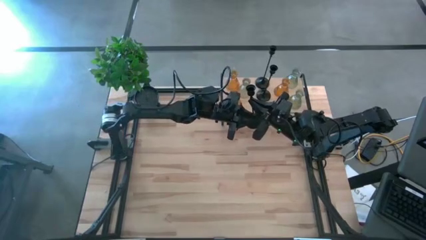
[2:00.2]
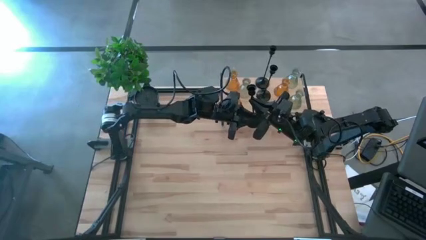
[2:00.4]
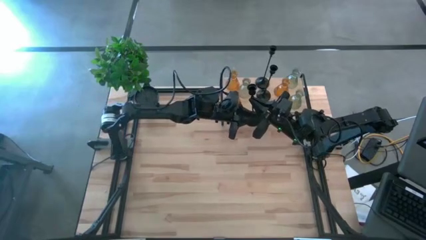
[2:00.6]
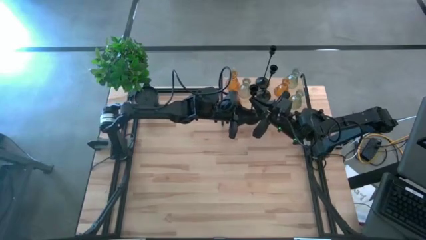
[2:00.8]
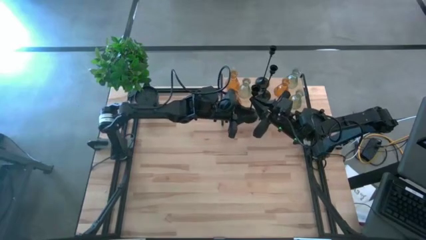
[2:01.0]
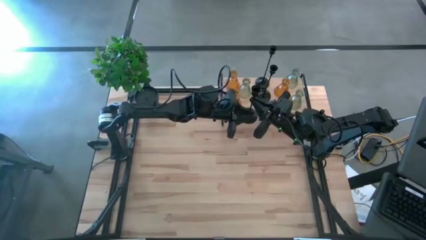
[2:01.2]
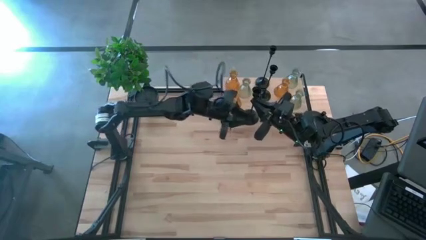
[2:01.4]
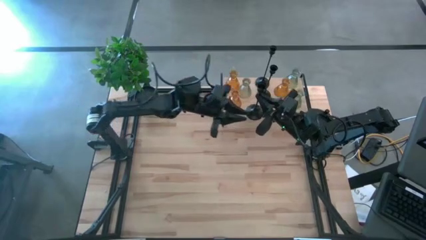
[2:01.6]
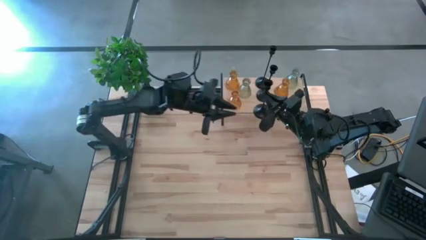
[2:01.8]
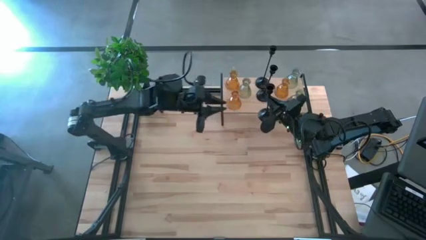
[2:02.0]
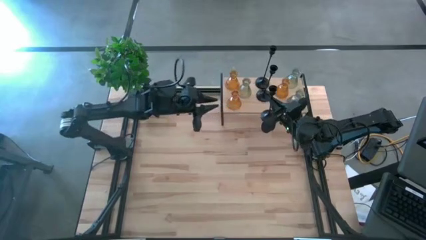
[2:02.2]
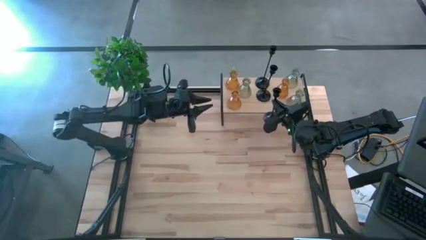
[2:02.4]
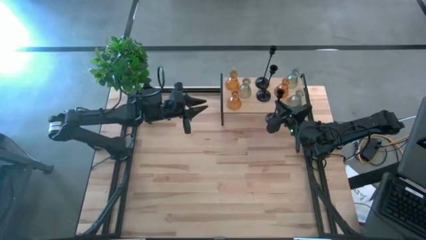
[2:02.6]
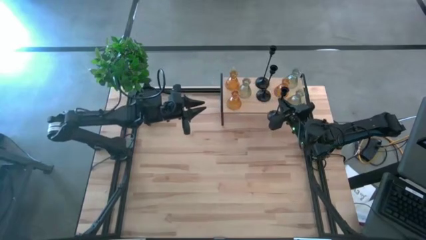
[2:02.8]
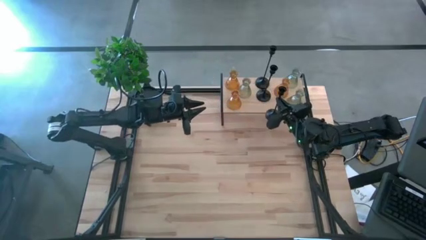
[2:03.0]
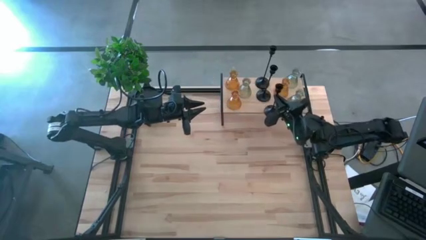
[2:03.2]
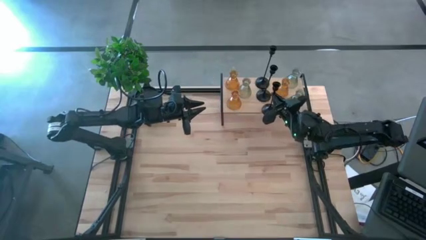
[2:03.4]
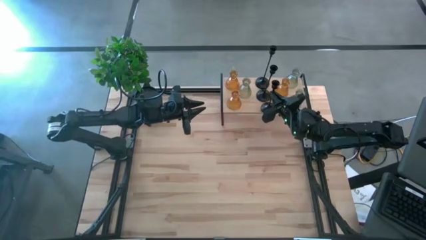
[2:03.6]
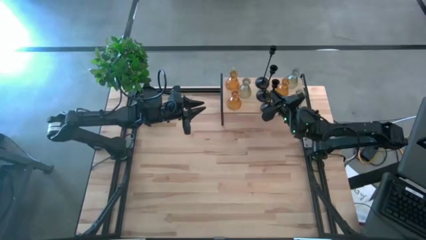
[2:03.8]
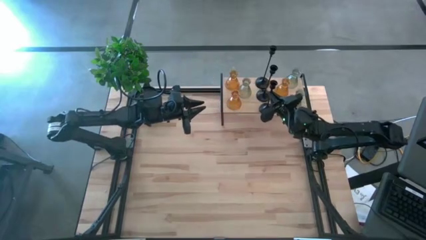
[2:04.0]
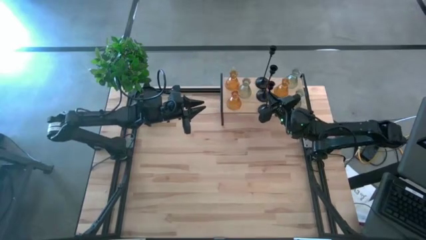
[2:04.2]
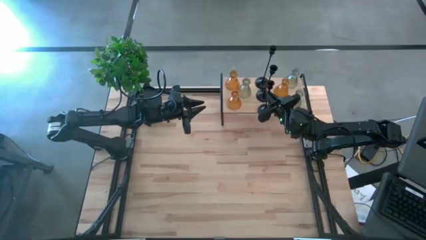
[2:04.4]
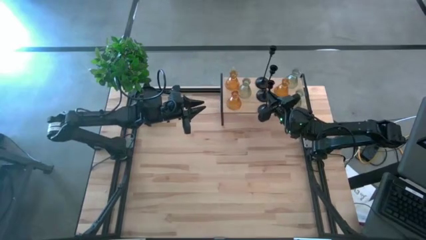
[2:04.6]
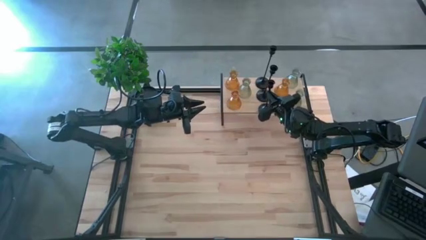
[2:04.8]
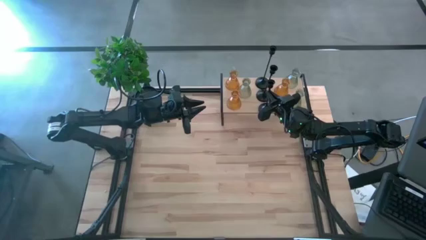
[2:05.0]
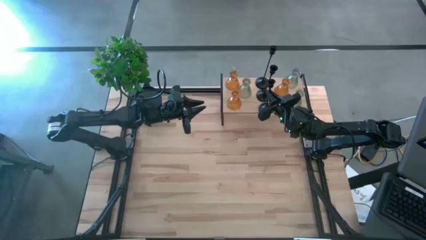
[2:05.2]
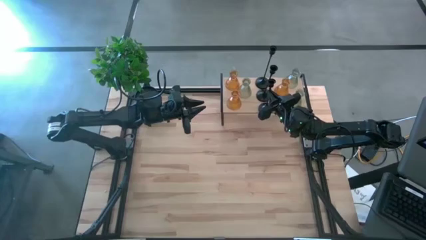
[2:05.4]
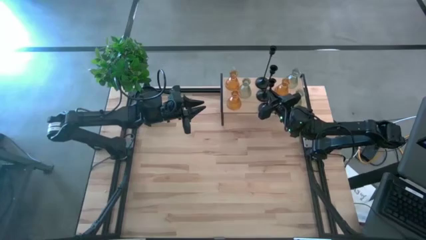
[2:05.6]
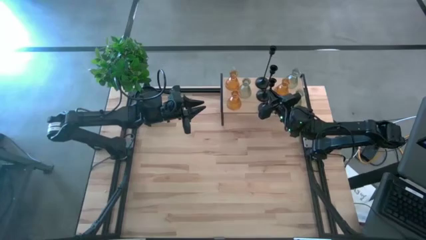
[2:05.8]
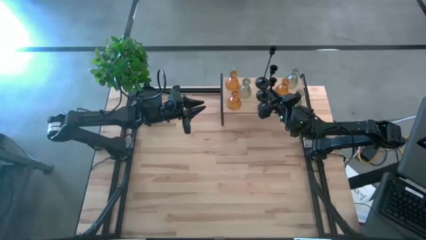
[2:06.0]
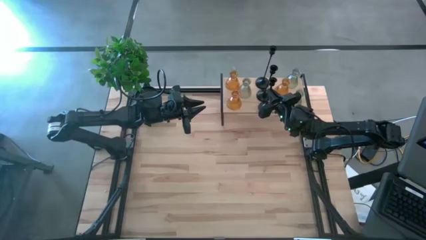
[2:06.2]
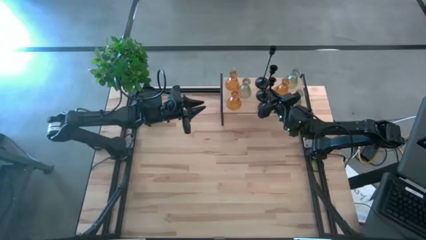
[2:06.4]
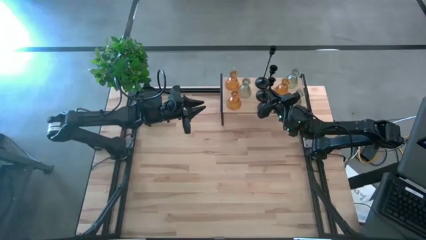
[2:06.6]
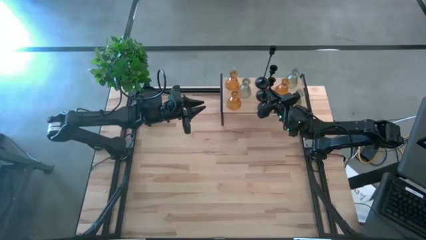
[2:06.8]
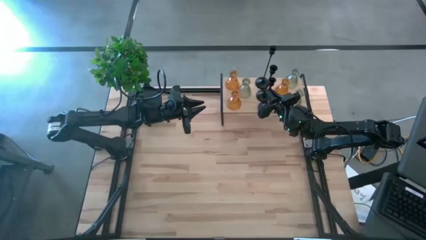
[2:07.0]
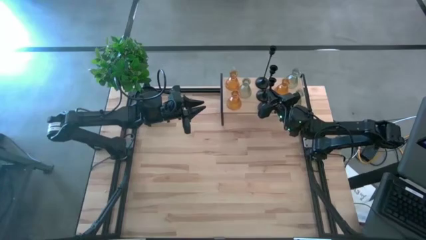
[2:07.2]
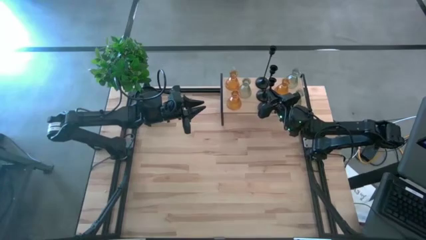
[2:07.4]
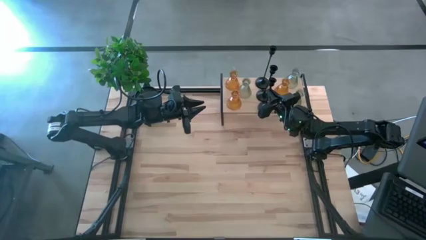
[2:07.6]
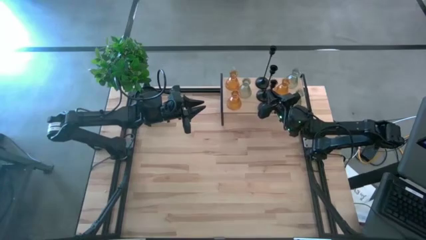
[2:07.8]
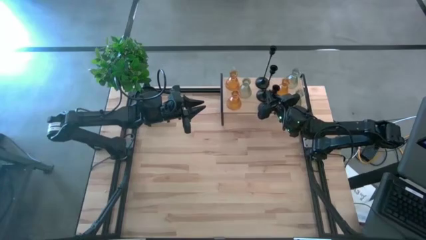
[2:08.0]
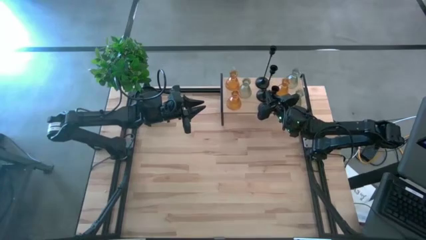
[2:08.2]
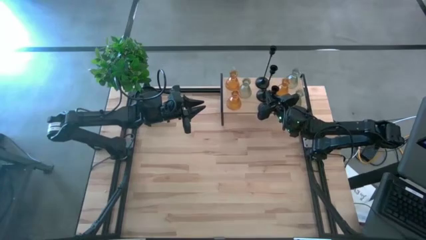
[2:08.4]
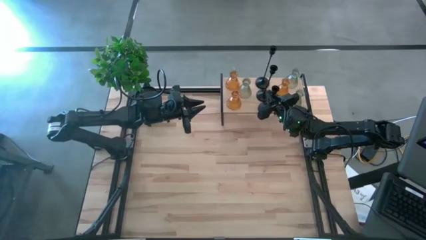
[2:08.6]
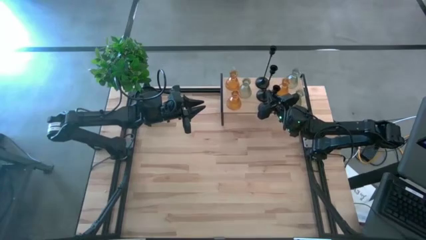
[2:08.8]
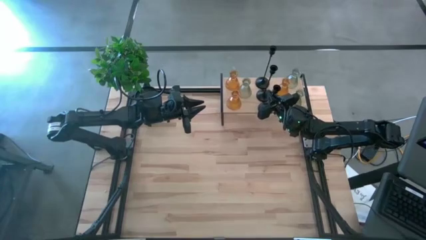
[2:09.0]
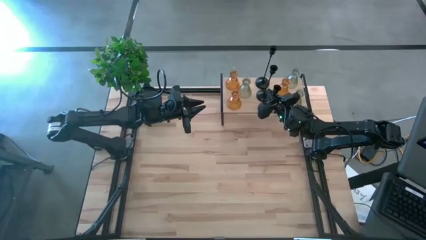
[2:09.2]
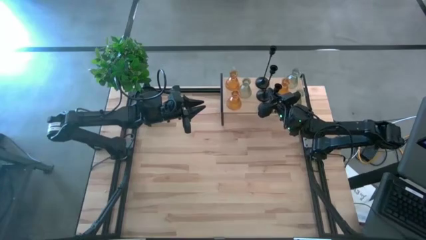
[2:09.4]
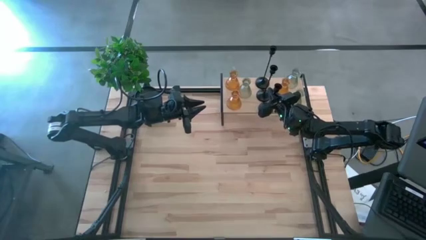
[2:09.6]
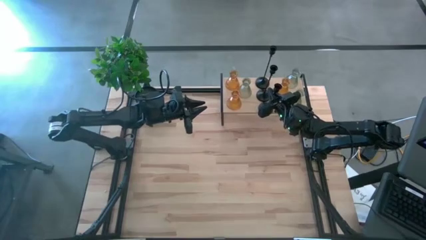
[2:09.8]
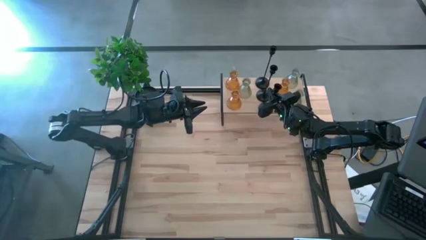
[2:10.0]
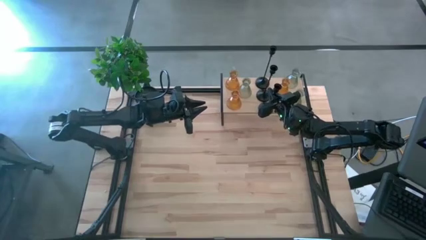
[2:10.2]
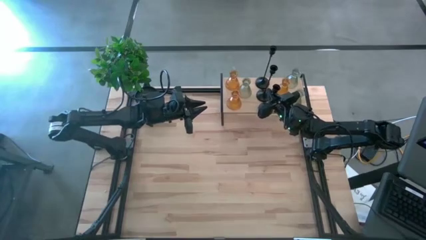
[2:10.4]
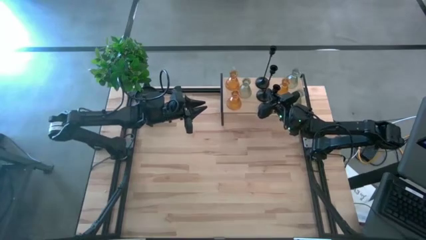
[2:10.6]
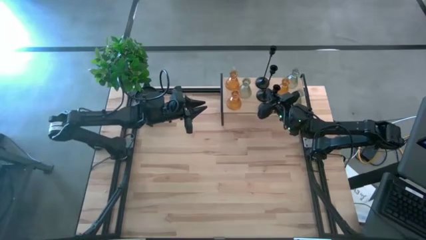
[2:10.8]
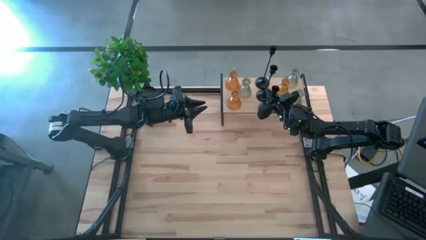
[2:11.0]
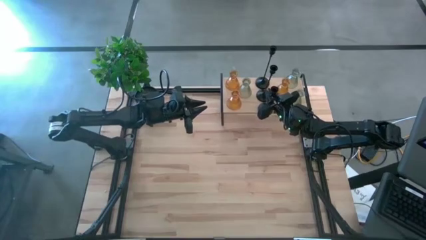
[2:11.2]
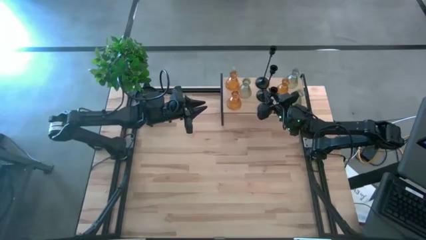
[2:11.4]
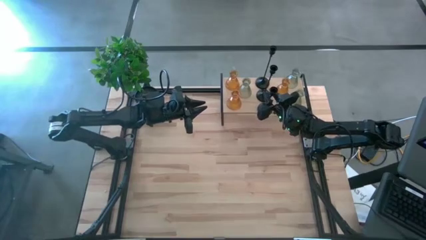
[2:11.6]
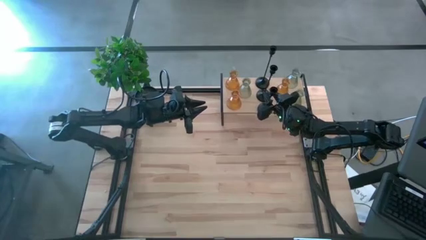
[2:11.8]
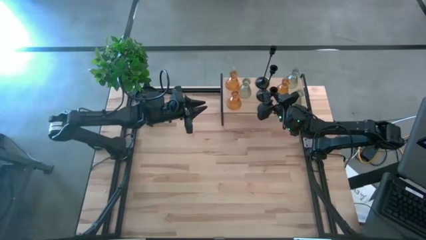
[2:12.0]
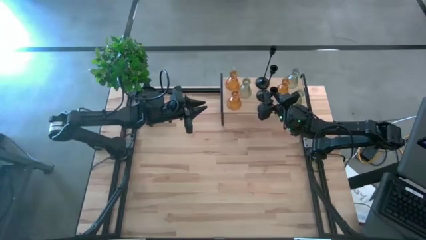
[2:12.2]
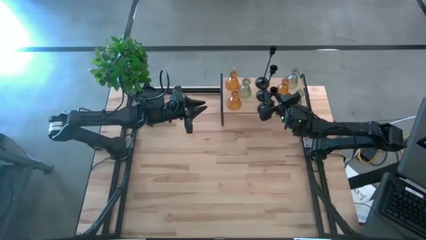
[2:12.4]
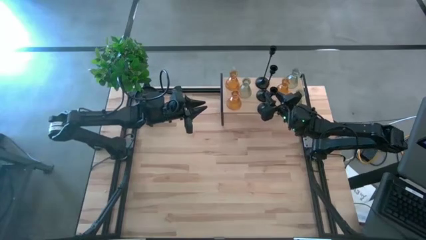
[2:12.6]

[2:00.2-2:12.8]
Task: Pick & Place candle stick holders
Put the black candle holder on the shelf

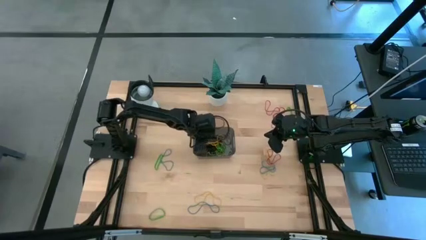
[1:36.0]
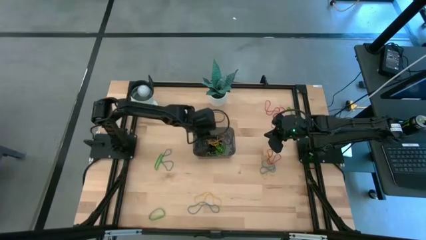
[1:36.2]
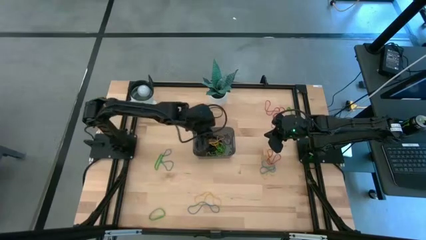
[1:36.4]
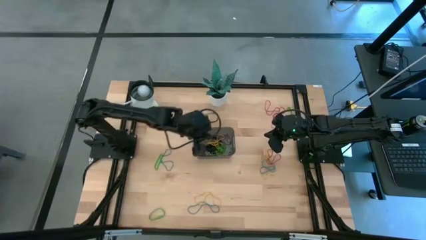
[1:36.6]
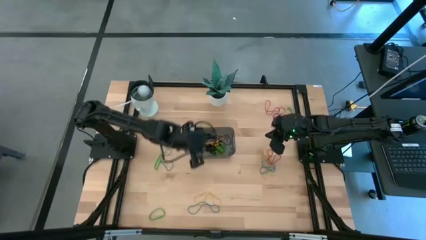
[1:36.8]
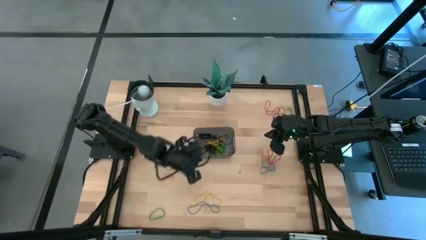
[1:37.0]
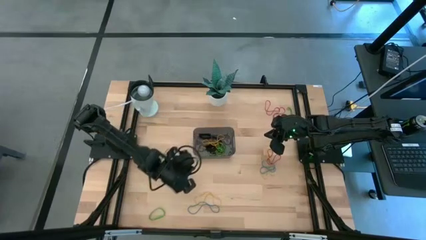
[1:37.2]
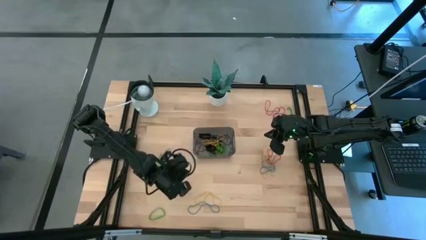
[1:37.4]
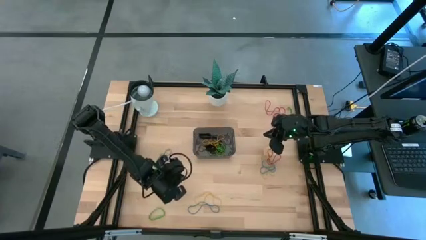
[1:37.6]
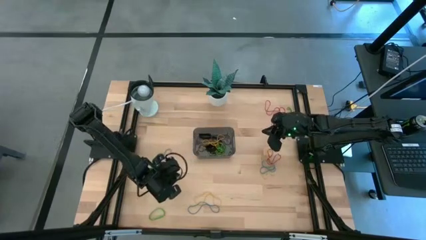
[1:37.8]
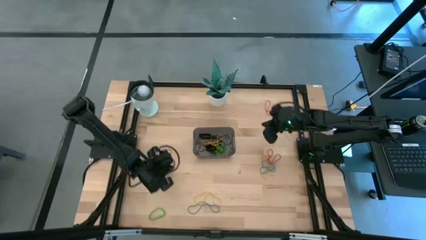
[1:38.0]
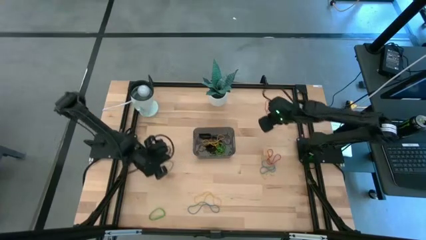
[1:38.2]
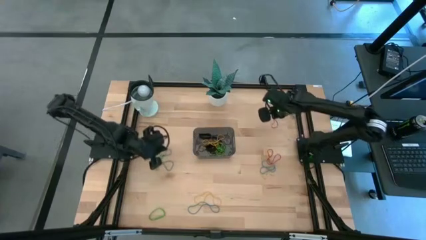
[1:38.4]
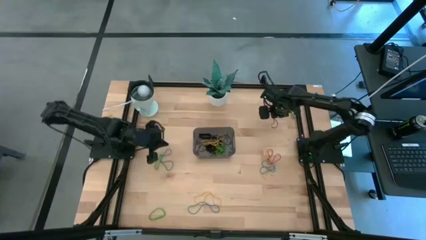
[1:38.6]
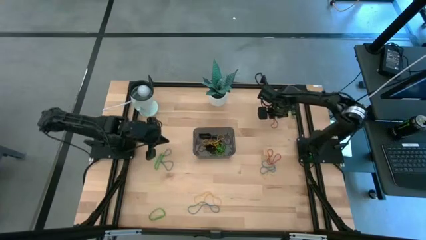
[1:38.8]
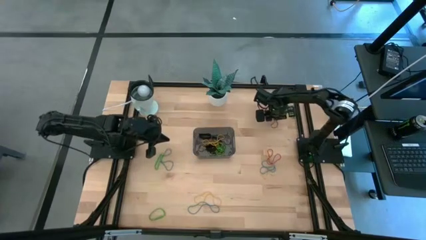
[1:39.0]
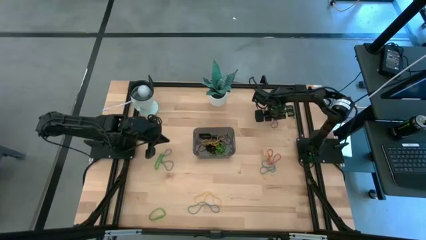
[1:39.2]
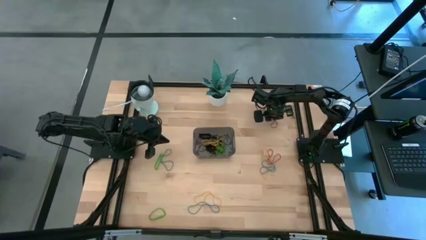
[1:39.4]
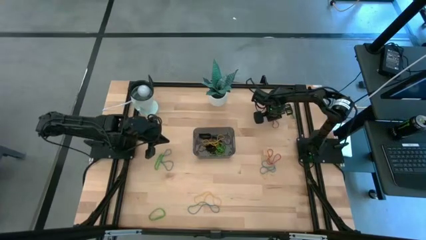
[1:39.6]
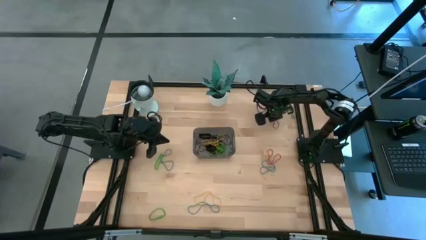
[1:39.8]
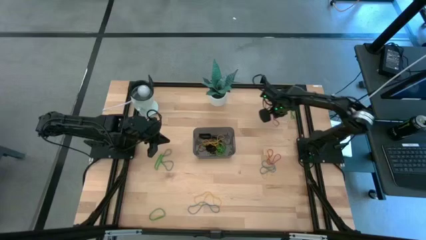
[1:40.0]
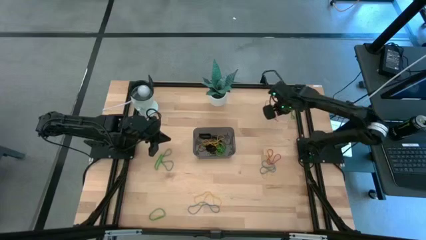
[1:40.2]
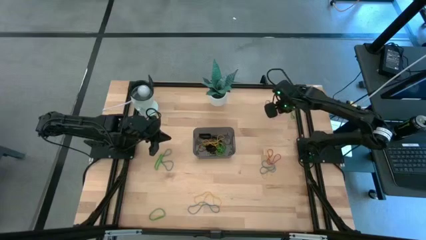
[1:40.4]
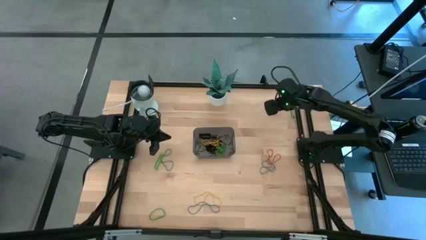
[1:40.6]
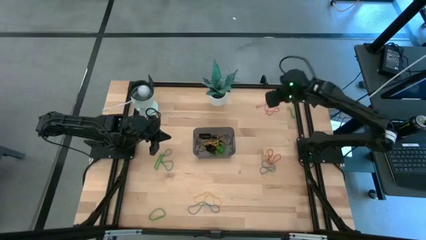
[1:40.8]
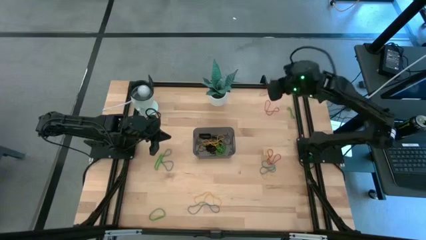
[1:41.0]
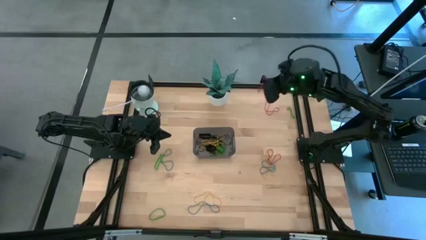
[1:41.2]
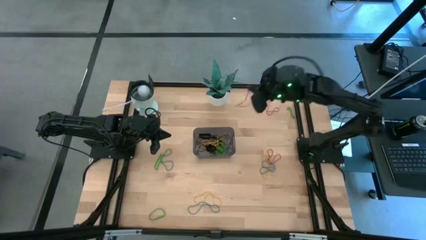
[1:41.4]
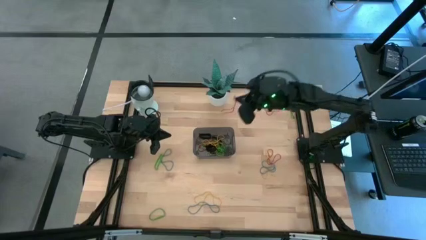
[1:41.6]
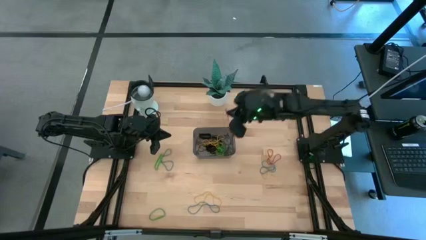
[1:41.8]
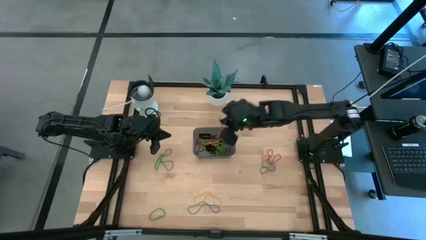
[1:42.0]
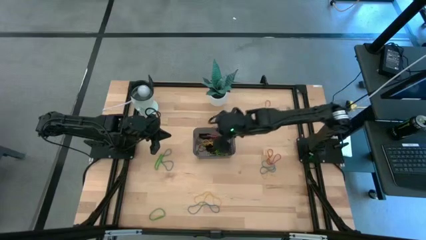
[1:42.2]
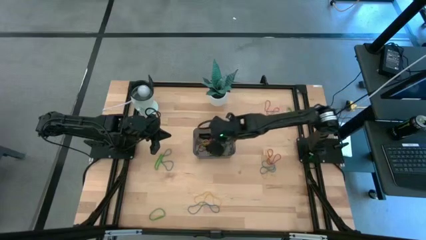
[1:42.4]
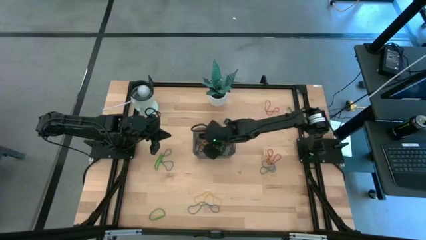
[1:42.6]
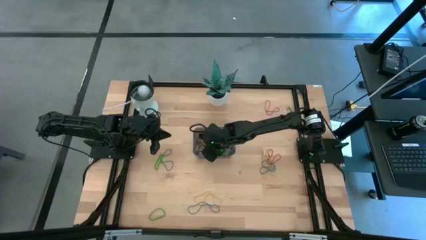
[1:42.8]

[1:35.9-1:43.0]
Task: Pick and place rubber bands into bin
Put the red rubber band into the black bin
